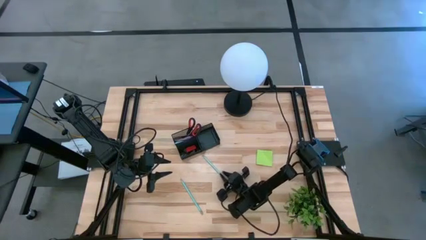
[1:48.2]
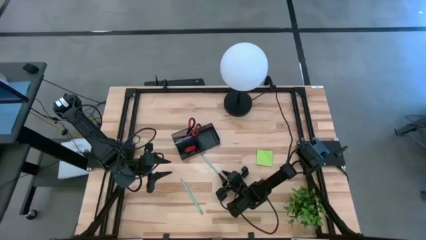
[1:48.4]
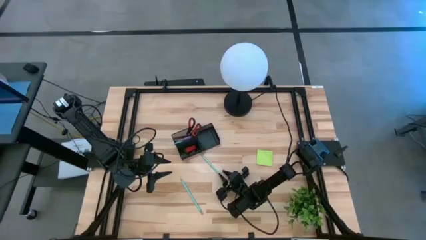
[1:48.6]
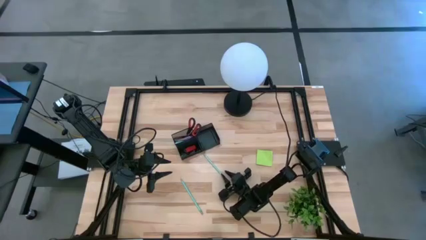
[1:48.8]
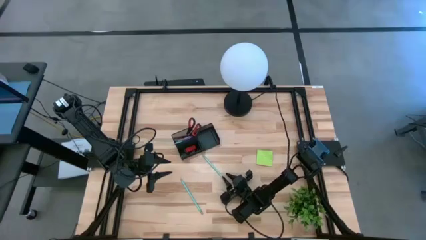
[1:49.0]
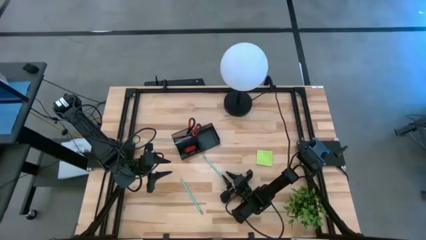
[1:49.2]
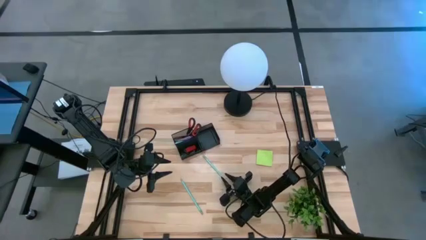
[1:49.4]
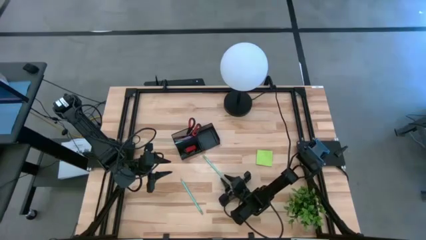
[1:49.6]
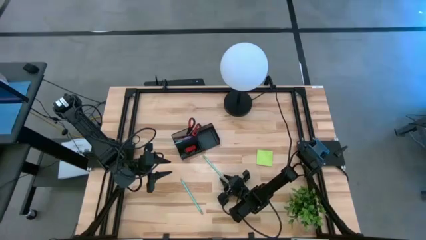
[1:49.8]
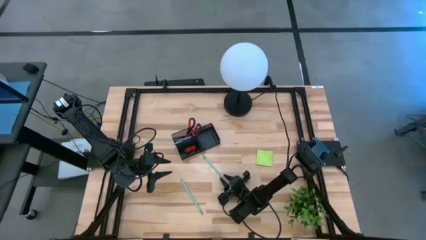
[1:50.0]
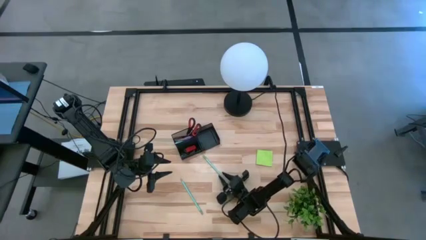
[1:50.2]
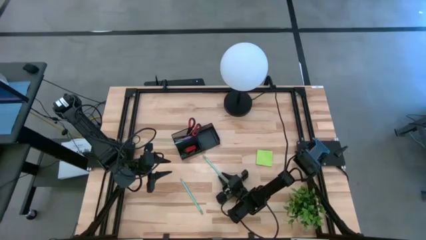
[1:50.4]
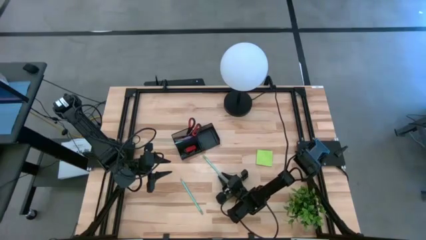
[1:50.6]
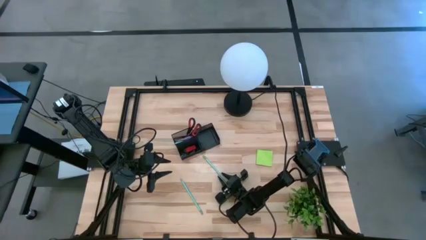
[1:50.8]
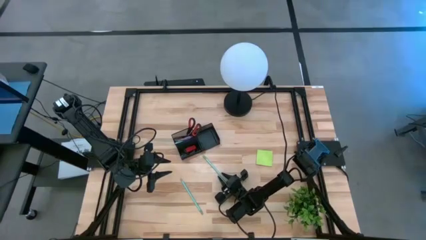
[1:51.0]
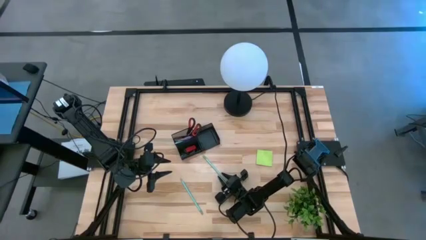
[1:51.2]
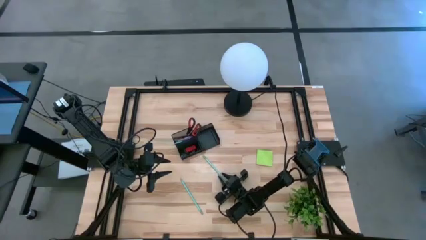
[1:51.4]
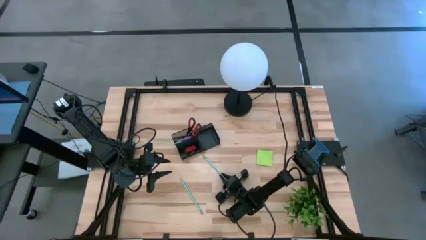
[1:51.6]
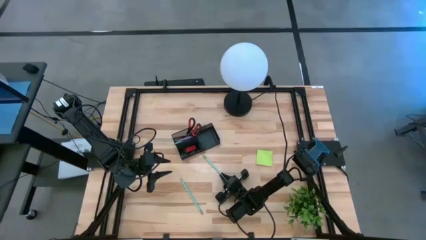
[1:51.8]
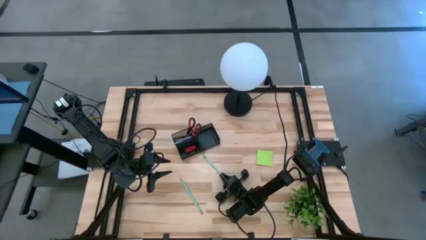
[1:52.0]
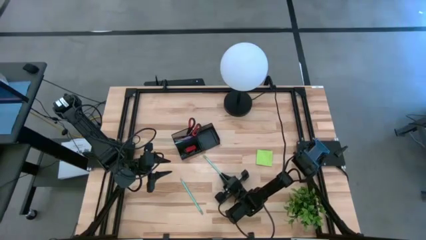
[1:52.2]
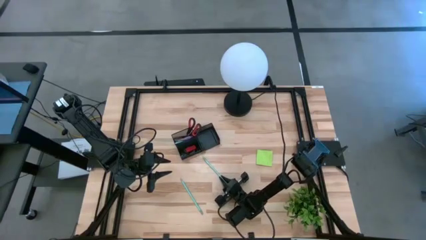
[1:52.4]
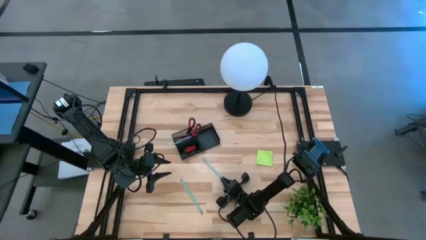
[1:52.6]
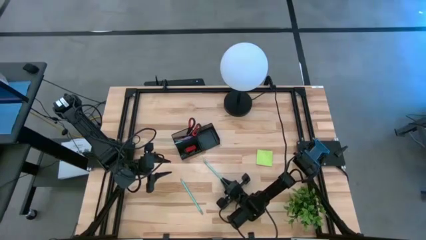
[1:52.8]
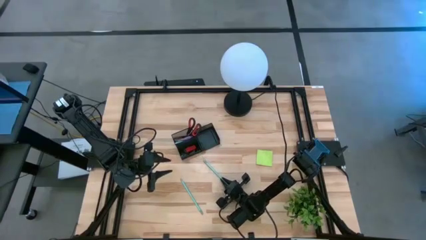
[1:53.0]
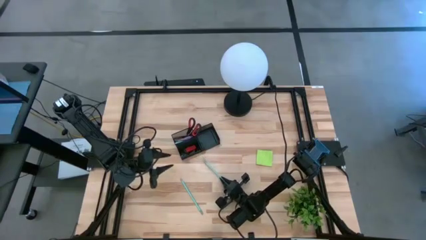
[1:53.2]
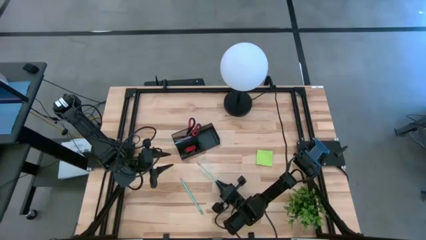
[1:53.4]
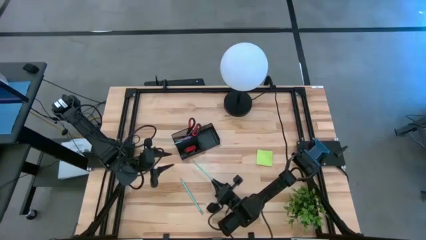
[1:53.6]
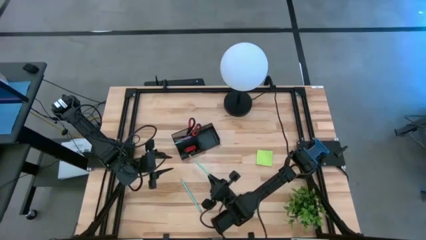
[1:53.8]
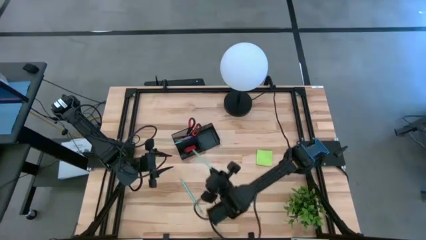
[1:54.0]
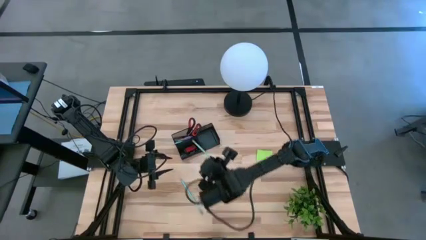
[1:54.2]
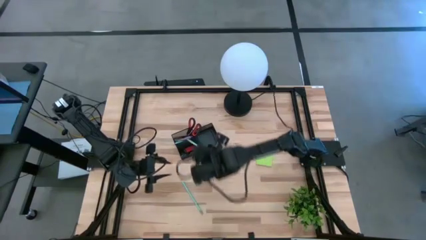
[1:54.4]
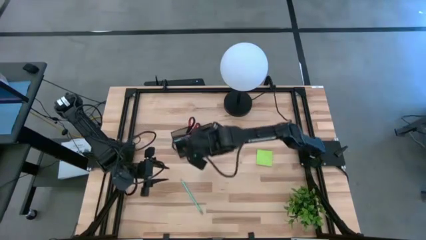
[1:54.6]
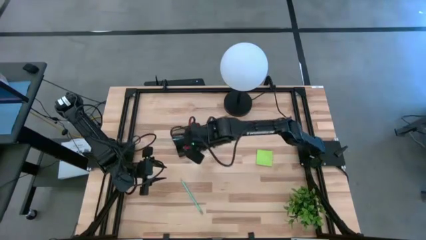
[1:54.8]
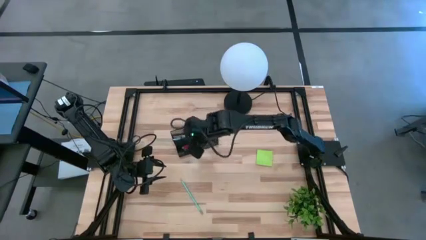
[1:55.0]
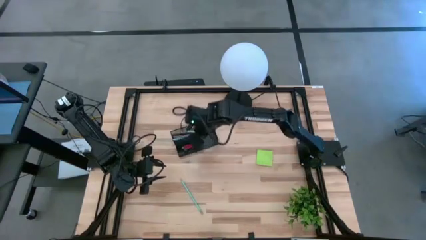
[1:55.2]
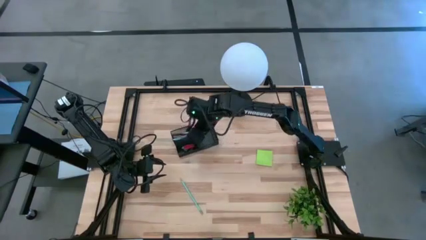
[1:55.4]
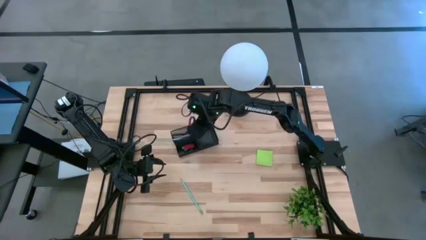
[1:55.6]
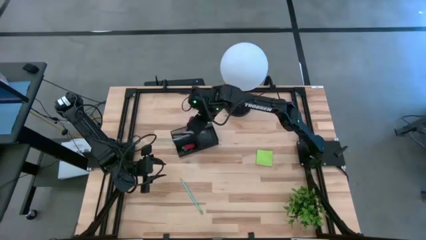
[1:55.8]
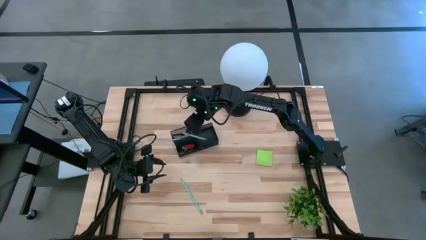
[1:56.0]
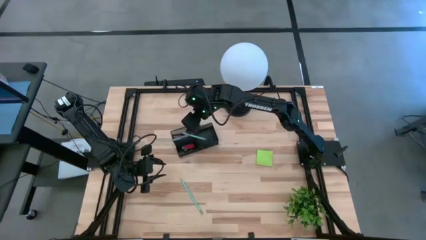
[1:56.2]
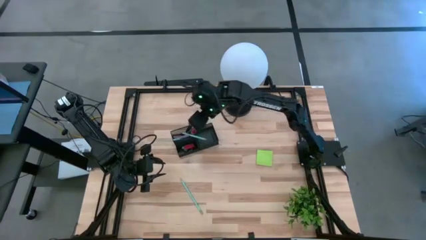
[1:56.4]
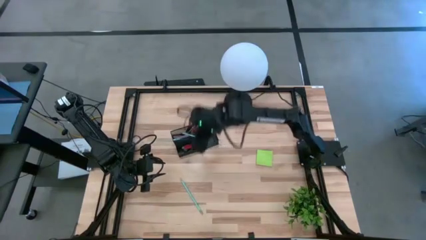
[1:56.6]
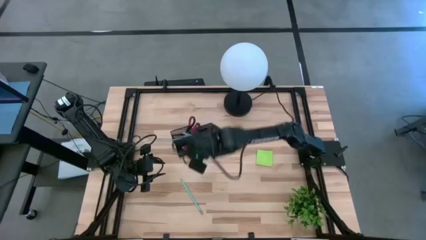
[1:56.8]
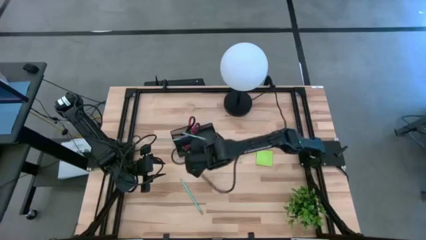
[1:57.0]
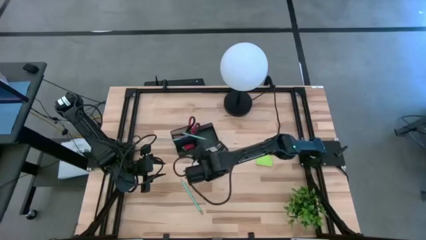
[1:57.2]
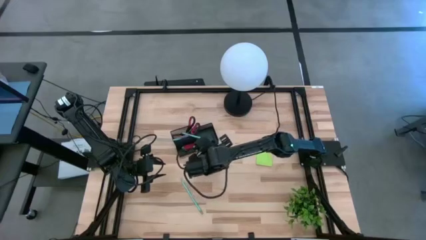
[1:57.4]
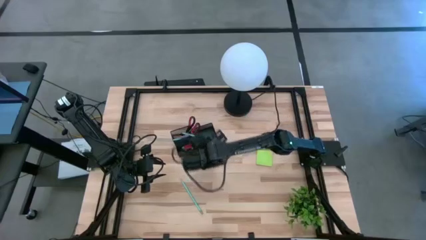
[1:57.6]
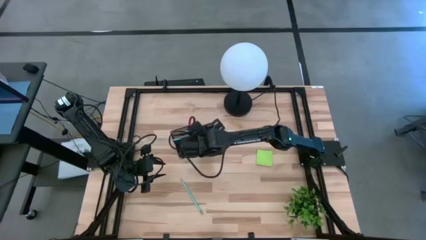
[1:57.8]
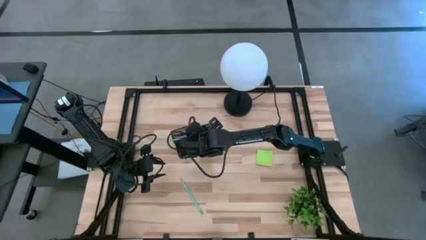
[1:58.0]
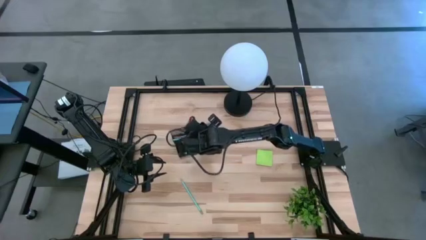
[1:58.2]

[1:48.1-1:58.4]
Task: Pick and place office supplies into organizer
Put the right blue pencil into the black desk organizer

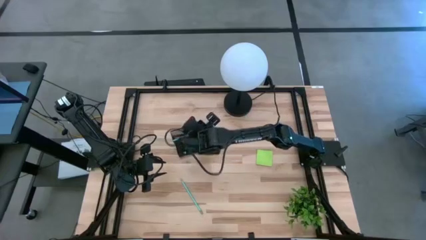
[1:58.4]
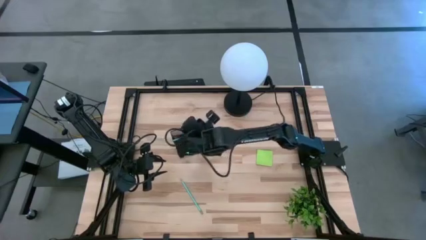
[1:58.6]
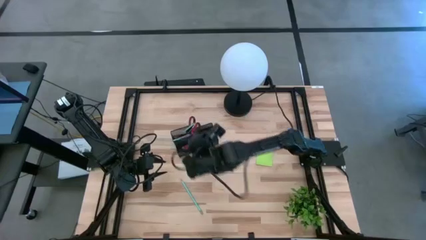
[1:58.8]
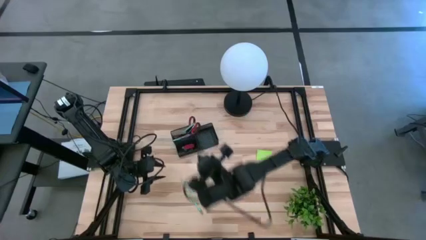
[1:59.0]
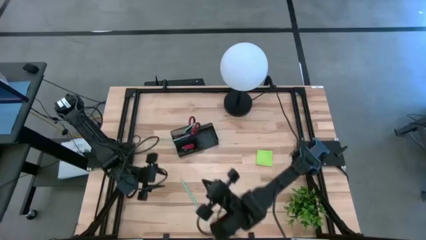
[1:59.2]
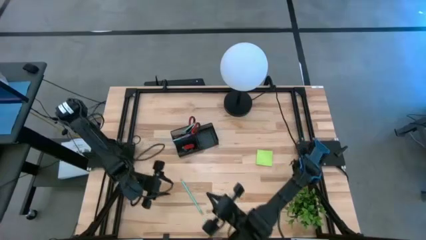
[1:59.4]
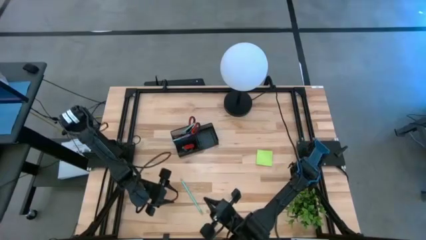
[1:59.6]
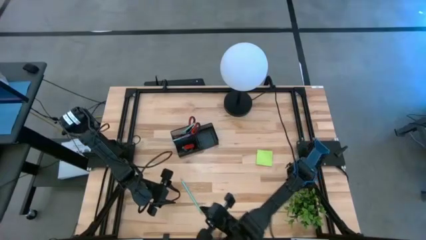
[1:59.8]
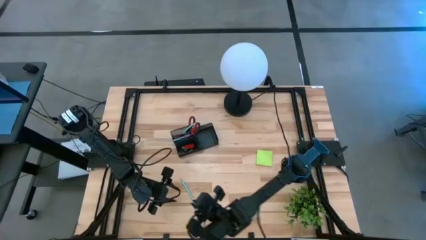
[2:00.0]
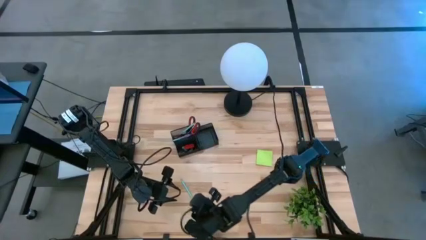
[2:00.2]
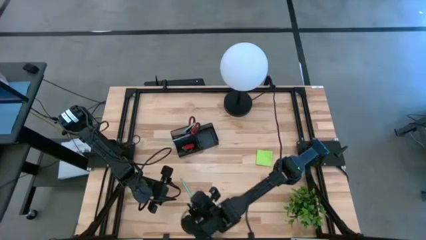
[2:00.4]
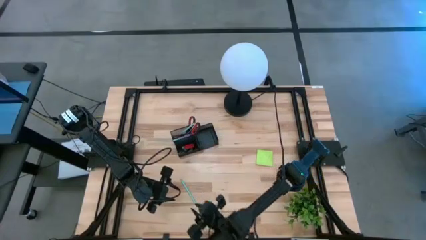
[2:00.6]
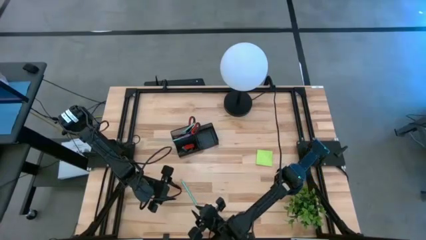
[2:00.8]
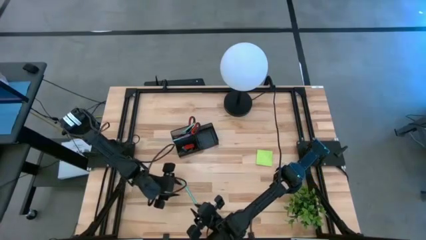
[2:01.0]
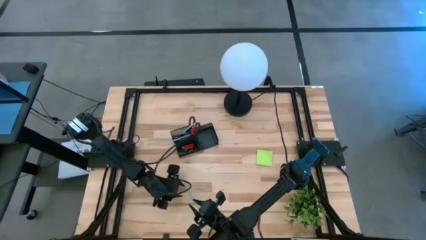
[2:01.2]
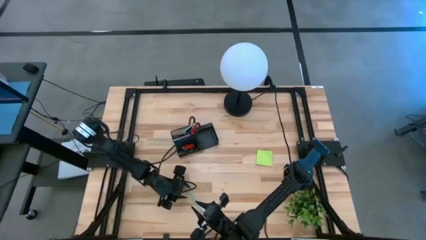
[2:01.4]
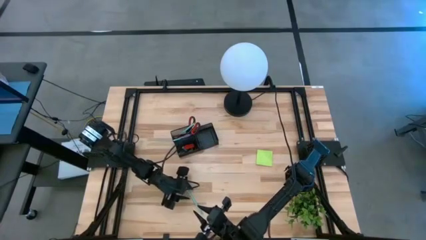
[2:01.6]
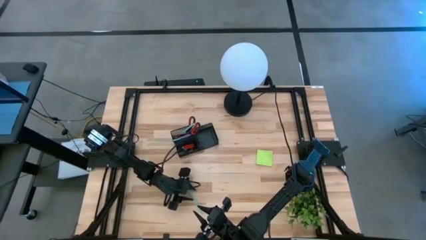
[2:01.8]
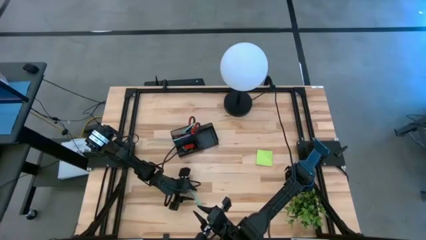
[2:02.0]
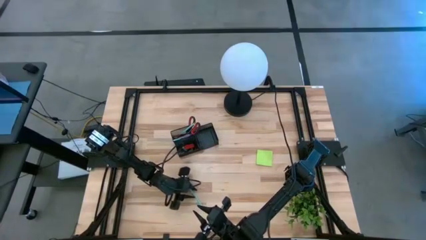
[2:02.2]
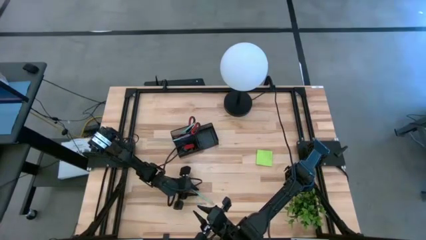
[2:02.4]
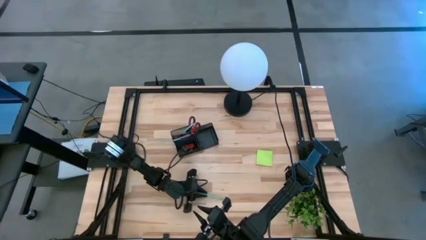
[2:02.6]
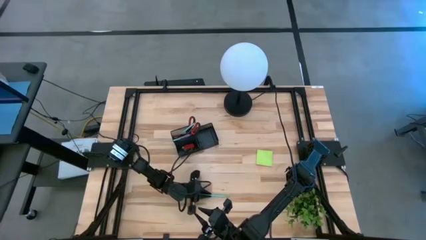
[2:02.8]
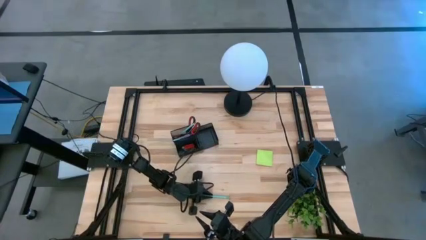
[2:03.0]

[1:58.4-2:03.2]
Put the blue pencil into the black desk organizer

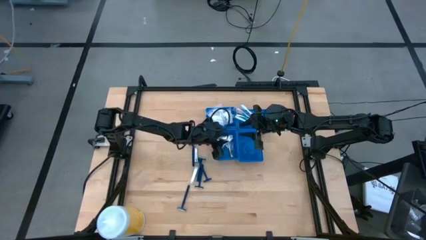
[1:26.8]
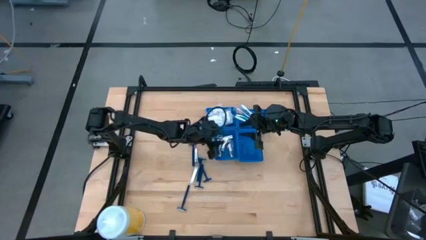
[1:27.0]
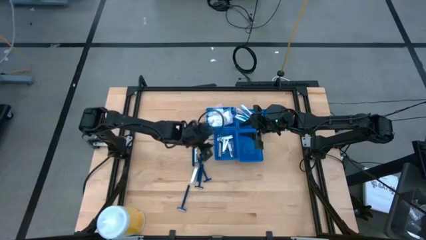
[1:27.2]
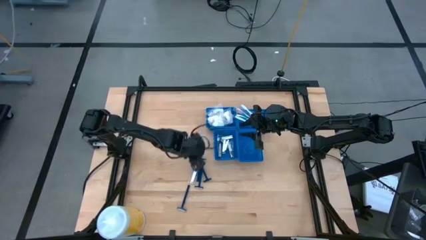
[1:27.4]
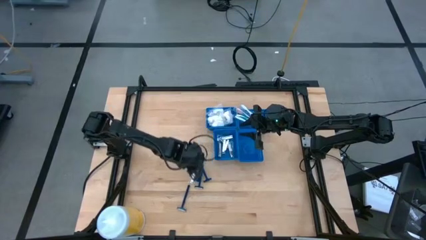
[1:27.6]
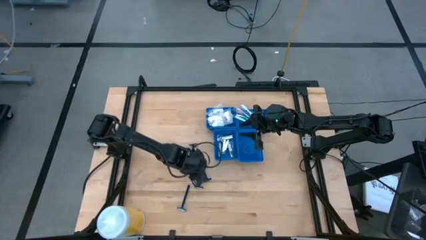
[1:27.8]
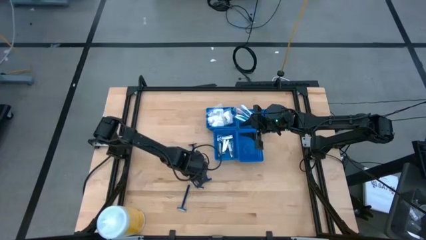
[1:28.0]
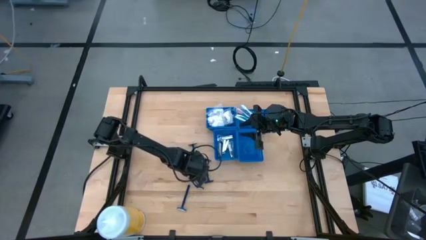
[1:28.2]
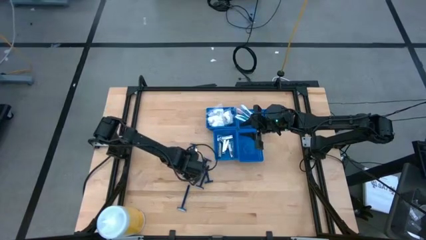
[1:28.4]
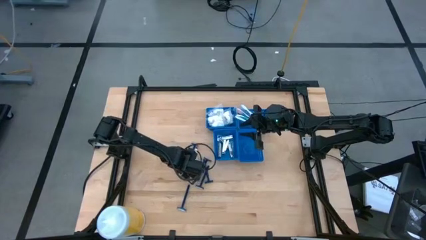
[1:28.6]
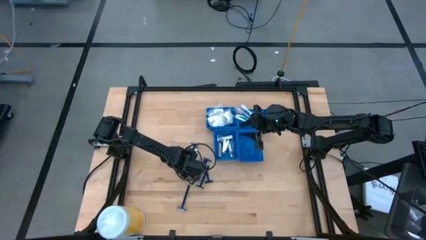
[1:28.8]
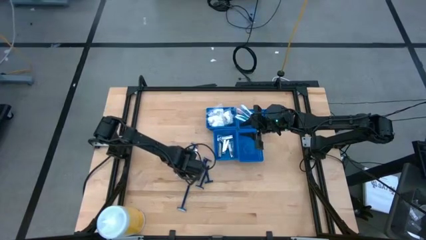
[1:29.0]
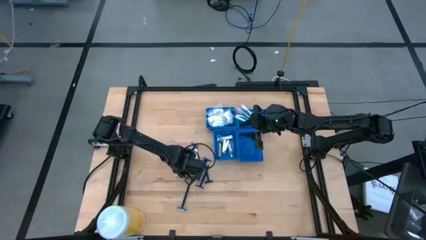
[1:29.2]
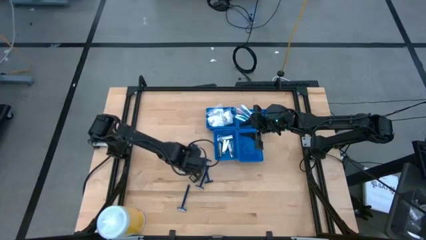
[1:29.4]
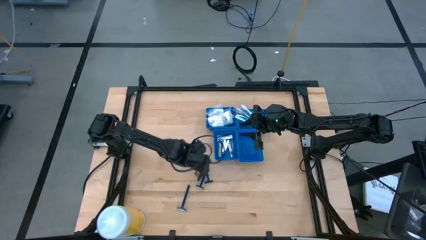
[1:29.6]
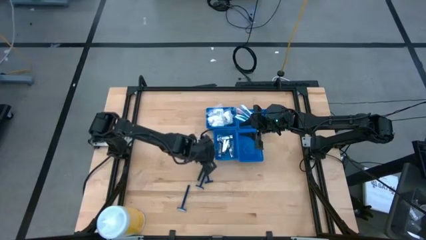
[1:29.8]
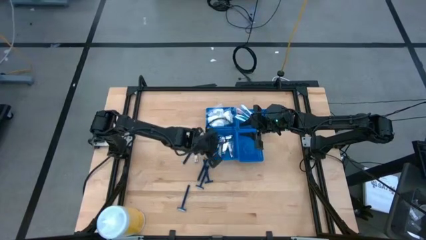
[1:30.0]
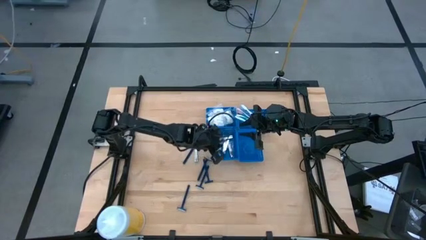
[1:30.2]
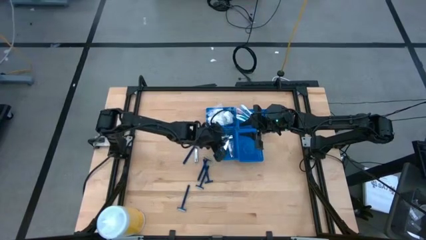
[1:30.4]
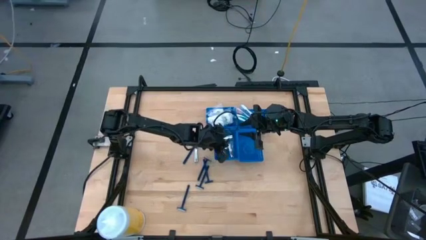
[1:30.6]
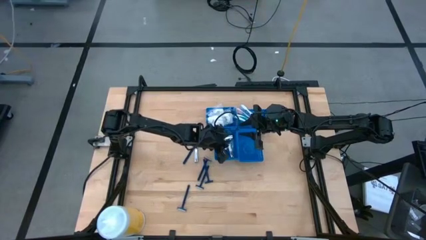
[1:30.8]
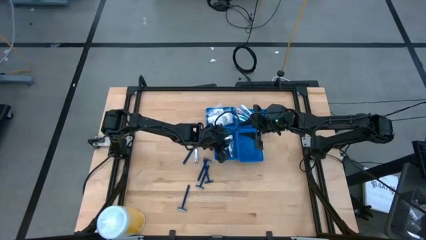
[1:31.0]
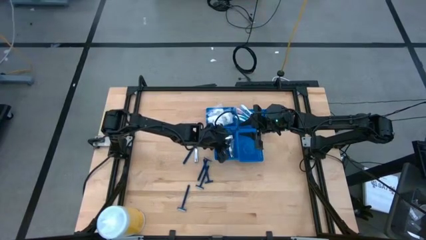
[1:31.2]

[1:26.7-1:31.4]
Task: Pick & Place Travel size toiletries
Put the silver nail cutter into the bottom left blue basket
